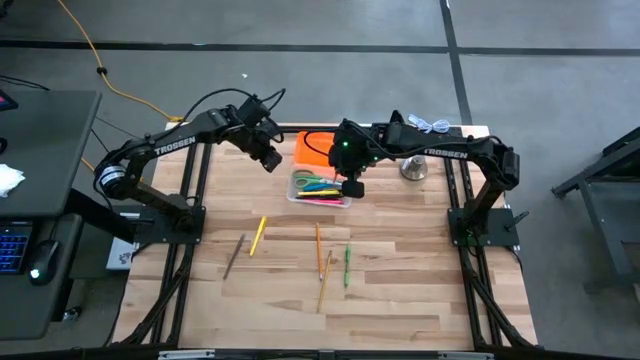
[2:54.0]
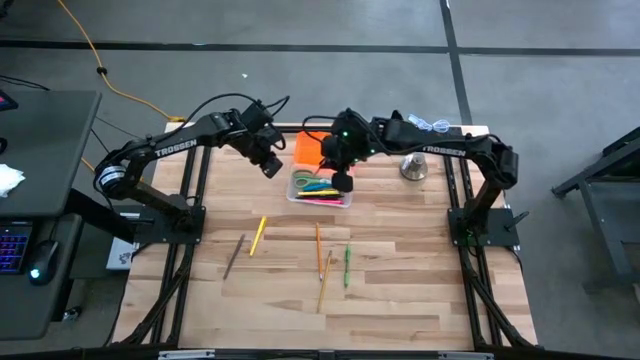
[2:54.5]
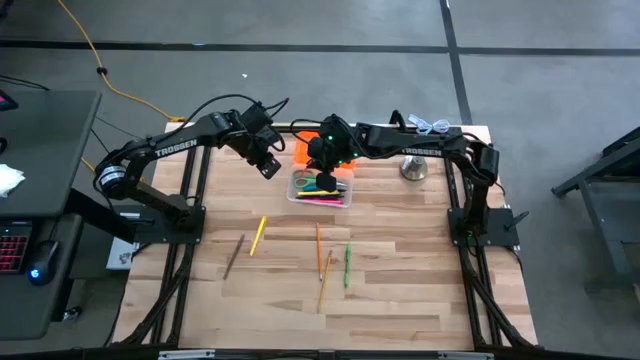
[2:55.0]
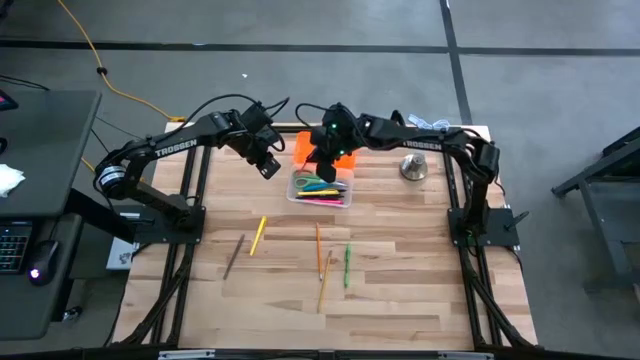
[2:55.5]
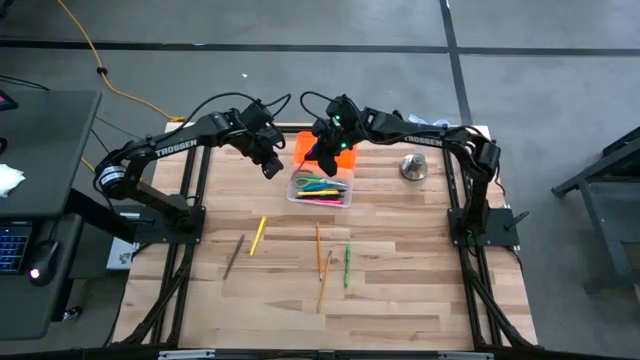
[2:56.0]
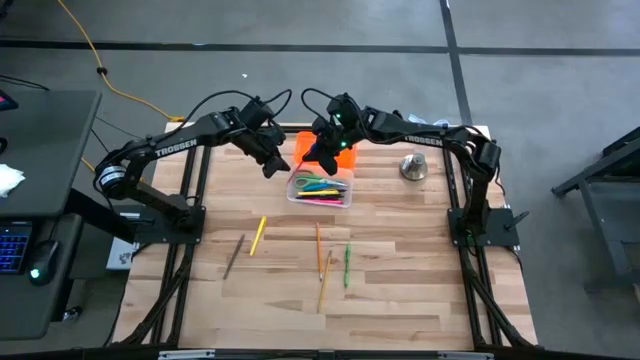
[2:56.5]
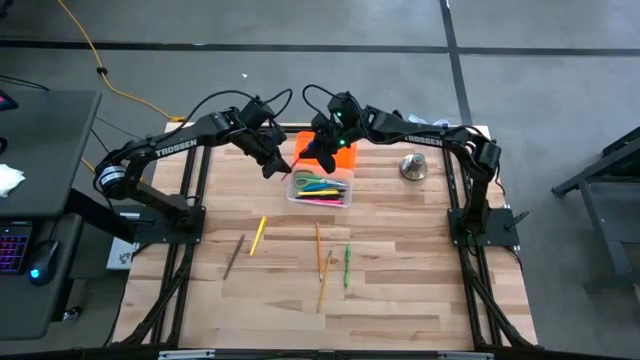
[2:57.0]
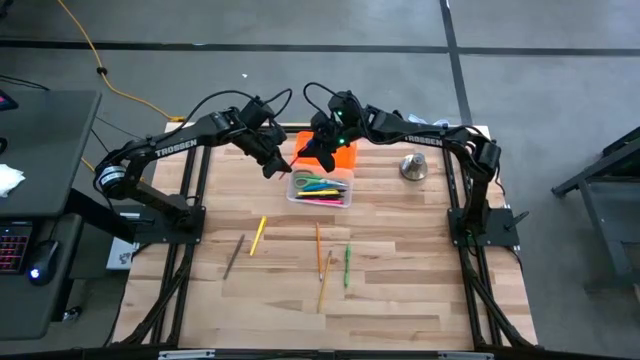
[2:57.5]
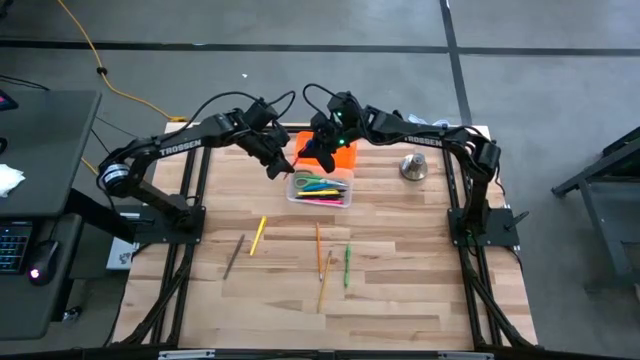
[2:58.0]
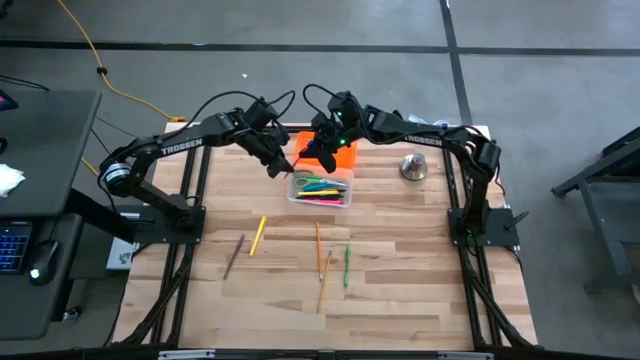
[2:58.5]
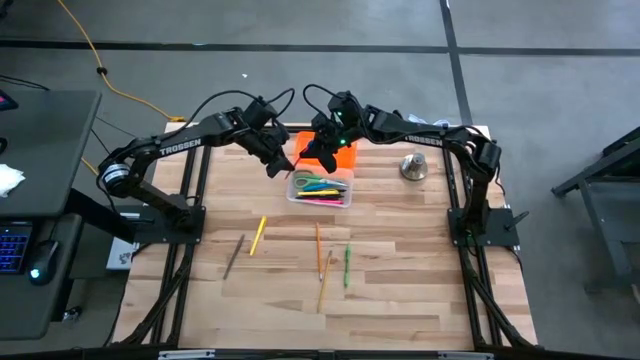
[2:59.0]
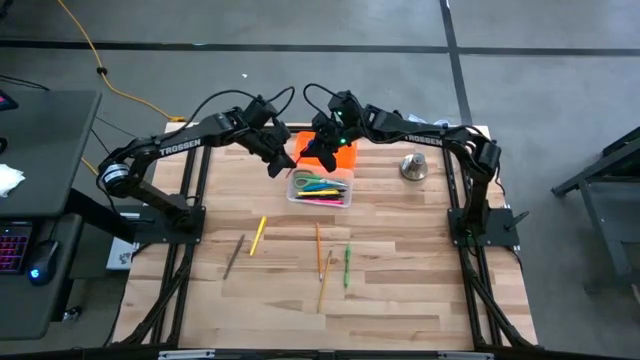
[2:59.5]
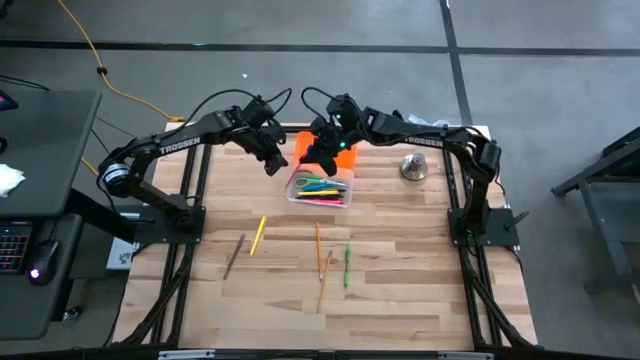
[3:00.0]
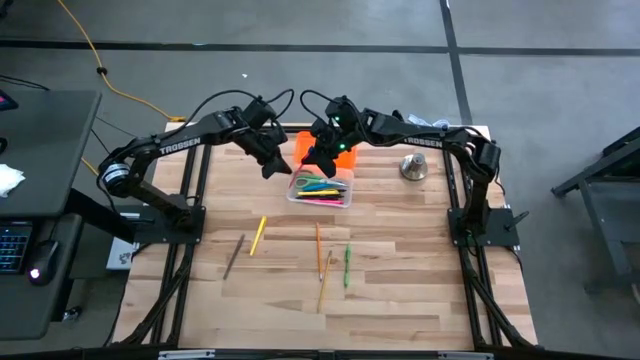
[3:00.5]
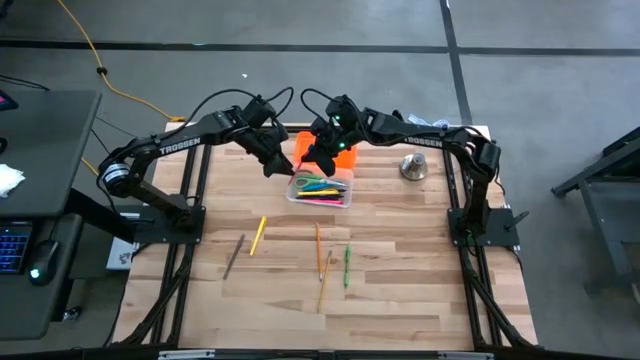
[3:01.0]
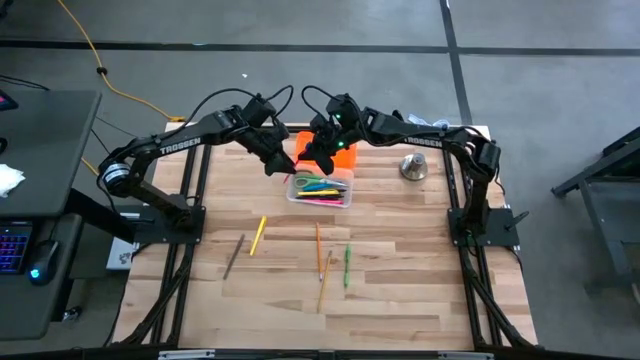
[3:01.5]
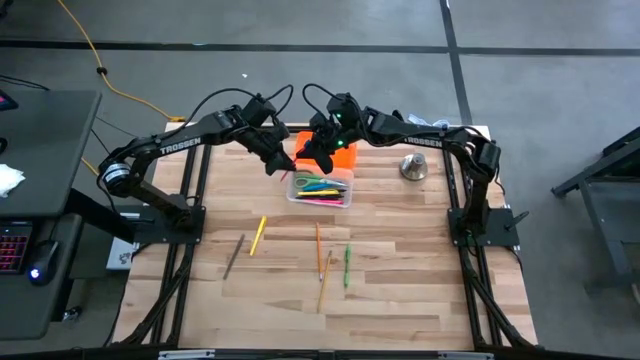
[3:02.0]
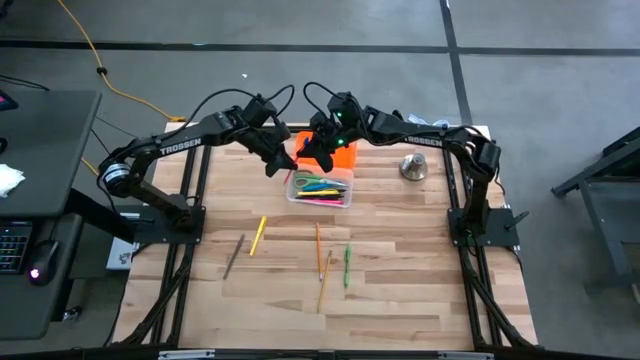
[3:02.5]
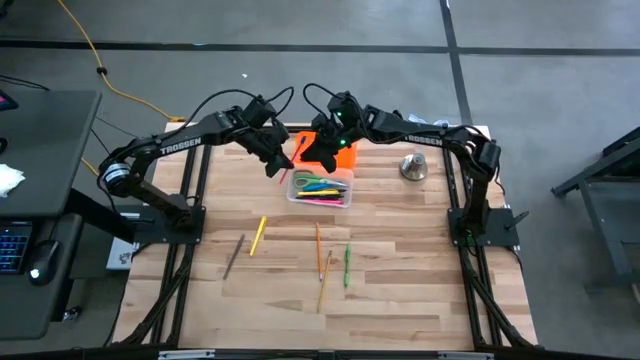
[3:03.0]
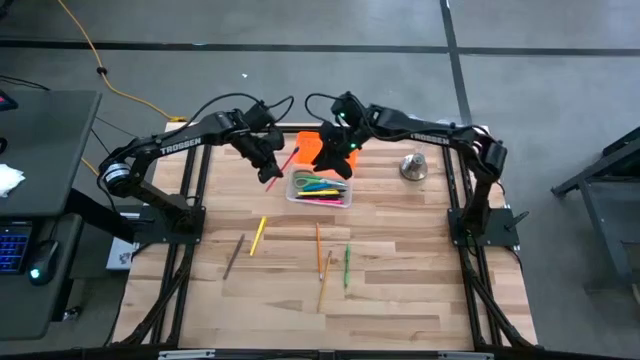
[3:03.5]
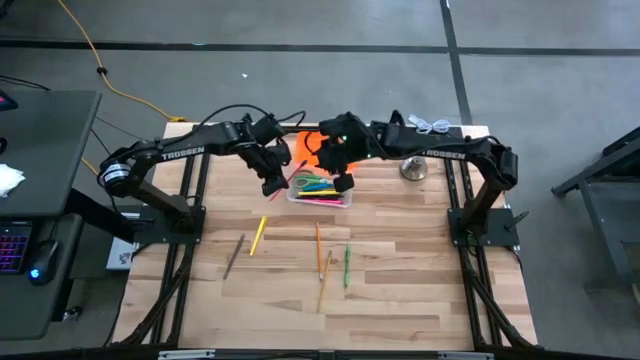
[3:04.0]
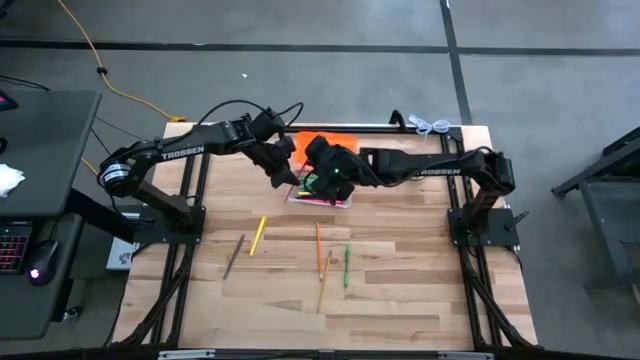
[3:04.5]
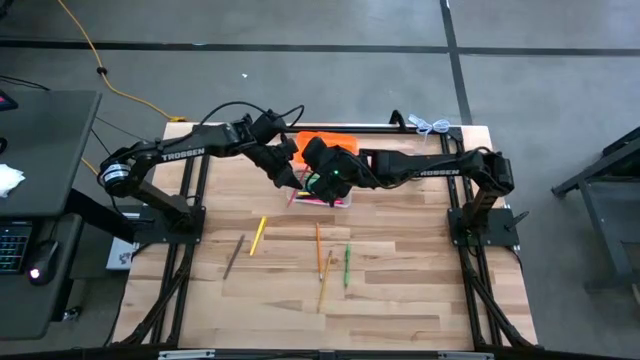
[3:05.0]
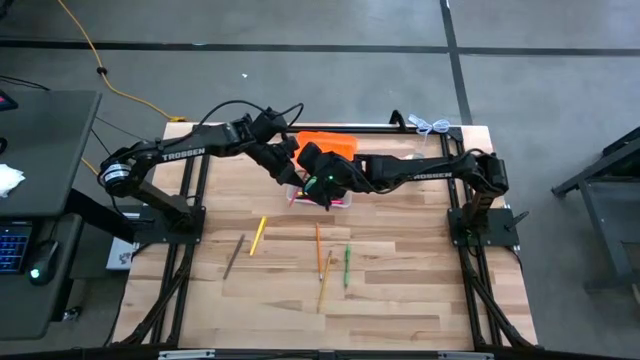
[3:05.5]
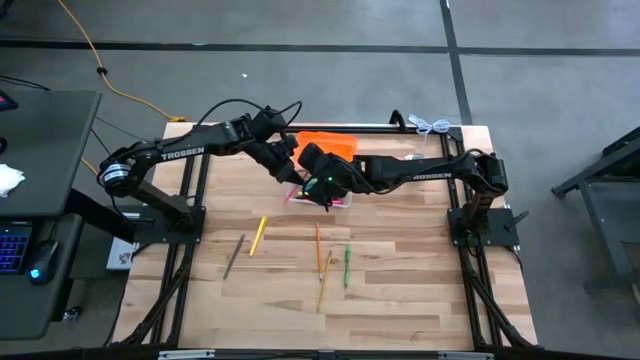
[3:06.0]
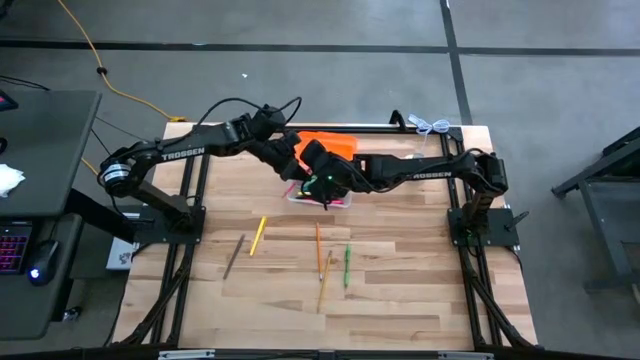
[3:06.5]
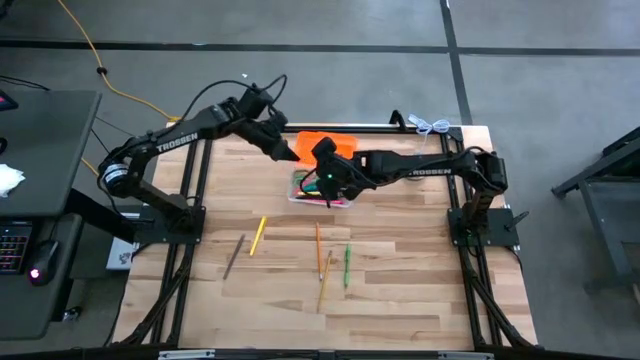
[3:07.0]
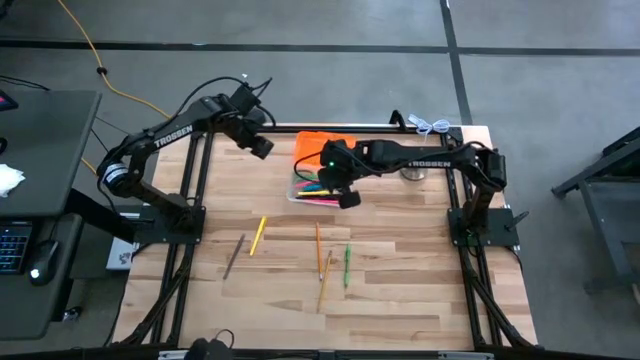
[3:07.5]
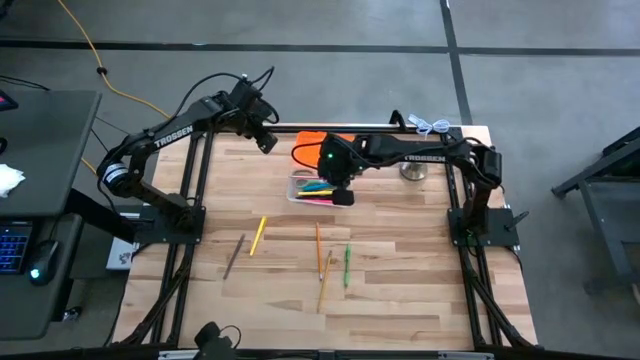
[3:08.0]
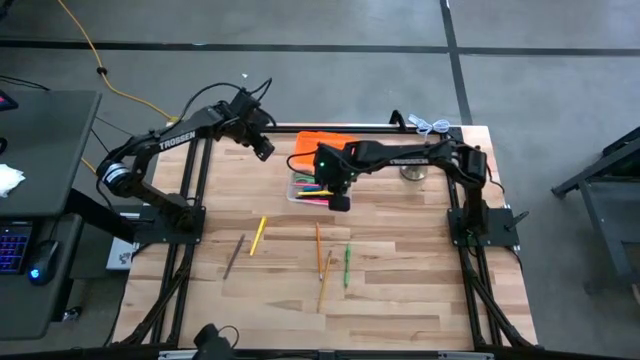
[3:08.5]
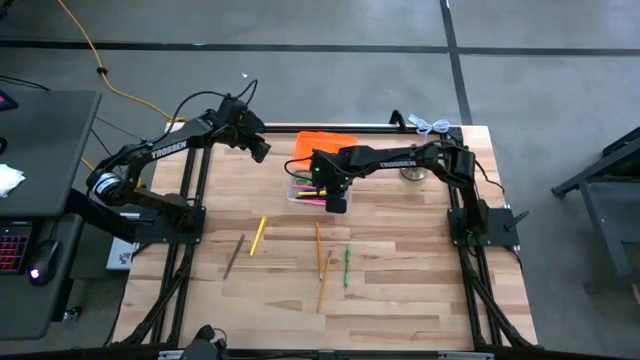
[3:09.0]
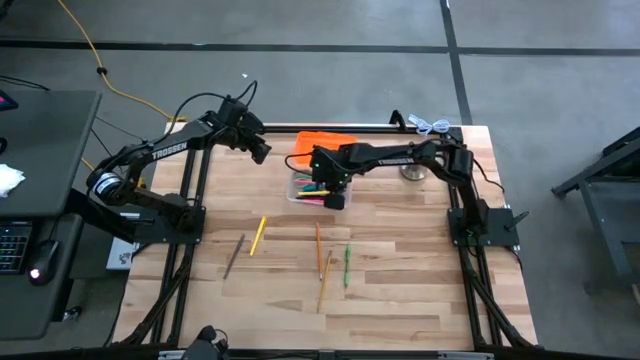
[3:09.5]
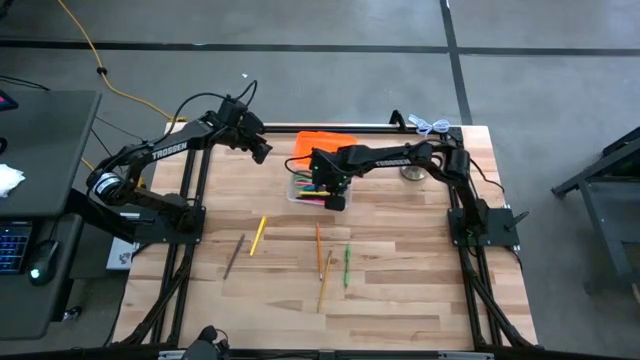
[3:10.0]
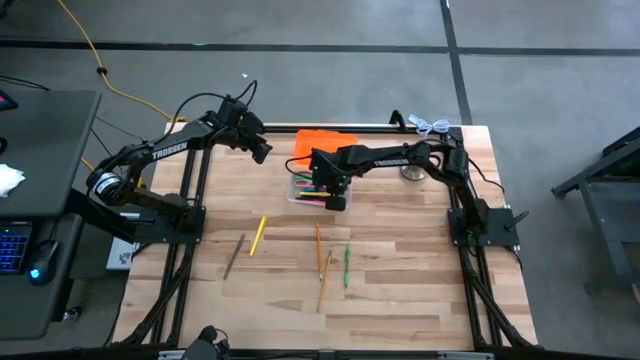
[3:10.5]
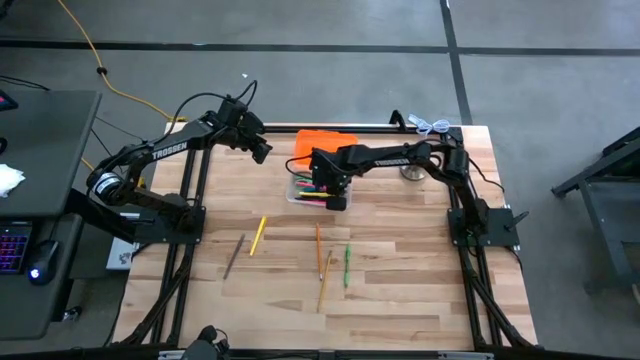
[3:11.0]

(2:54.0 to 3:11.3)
Task: Pick & place school supplies into a supply box
Put the pink pencil into the transparent supply box

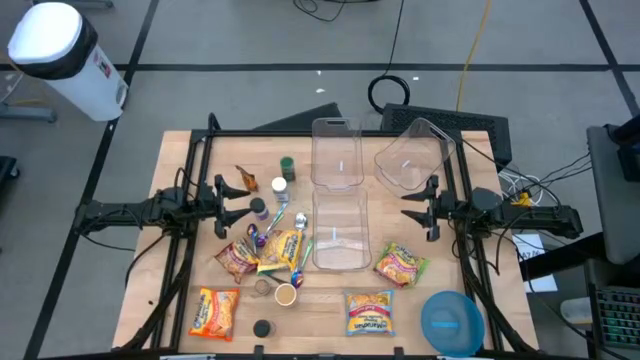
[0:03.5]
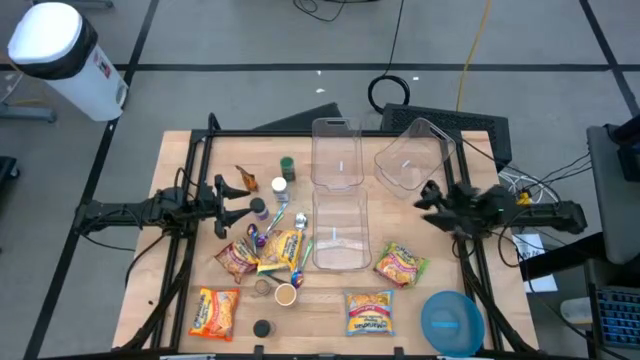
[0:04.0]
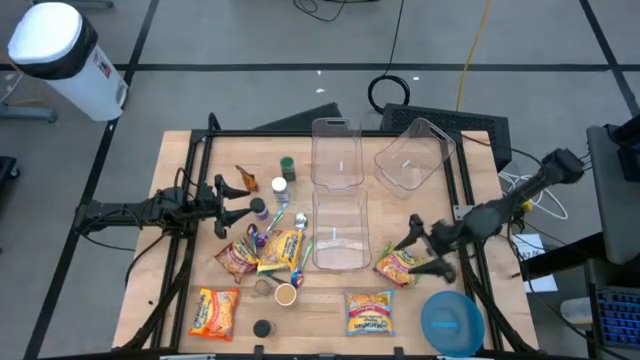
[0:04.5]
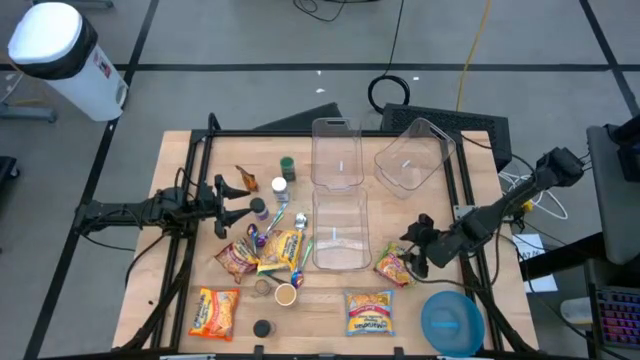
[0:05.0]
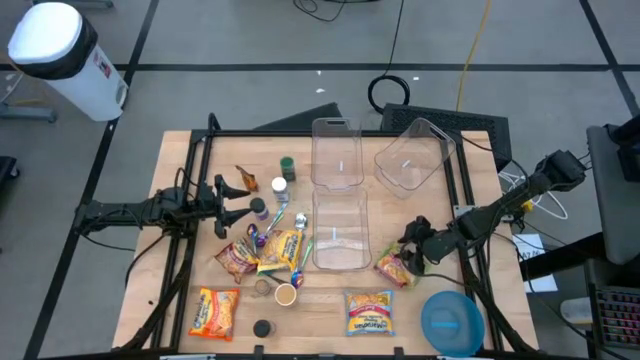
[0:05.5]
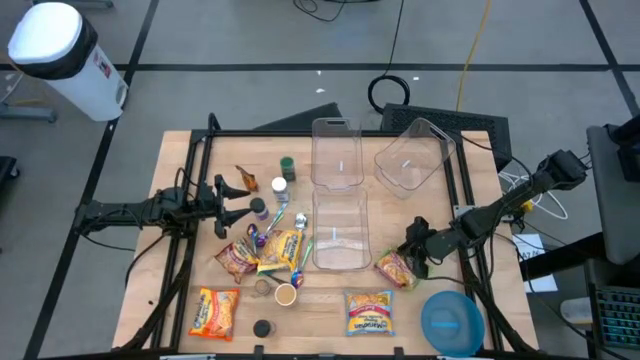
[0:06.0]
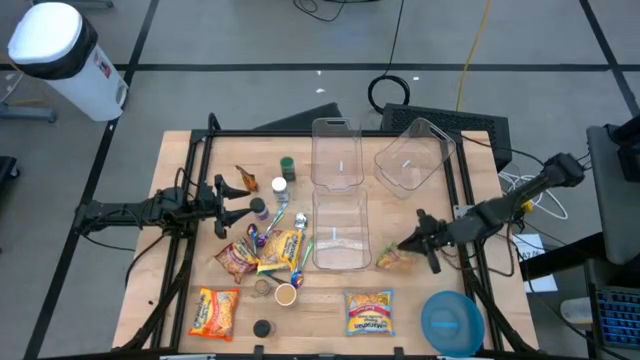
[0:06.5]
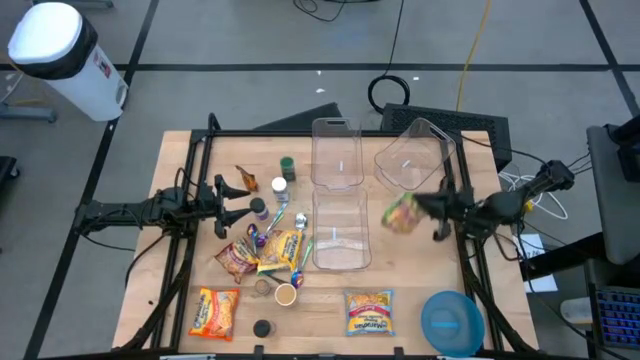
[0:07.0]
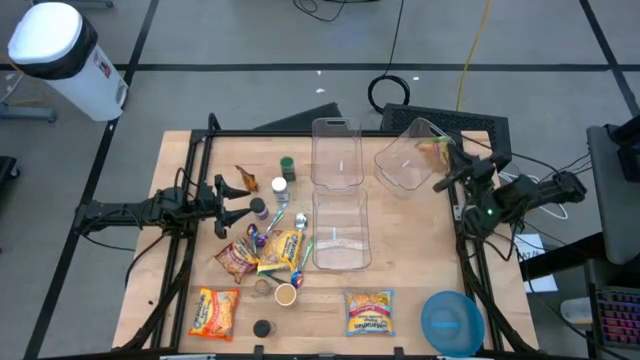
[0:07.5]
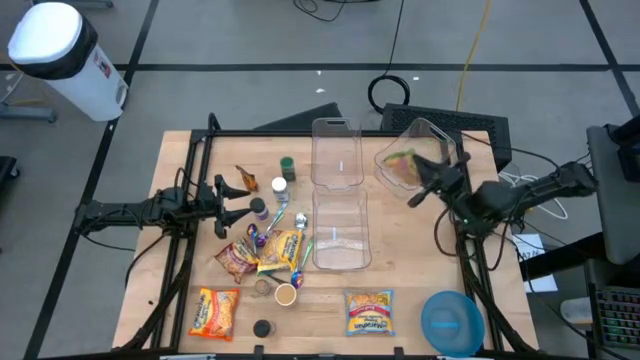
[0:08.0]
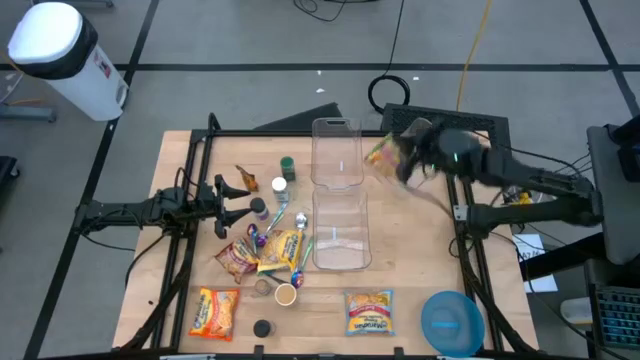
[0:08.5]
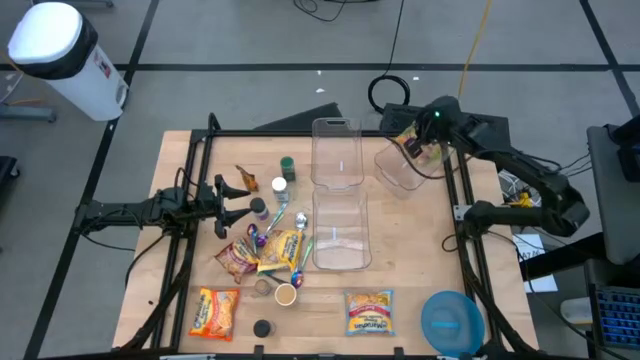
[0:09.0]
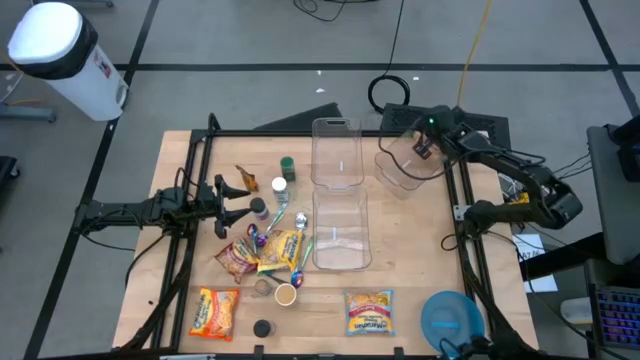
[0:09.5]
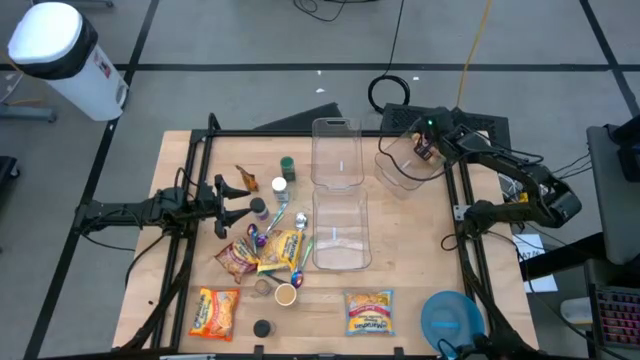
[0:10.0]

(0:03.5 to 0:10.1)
Task: Pick & Place Food Item
Put the green noodle pack into the top right transparent bin
